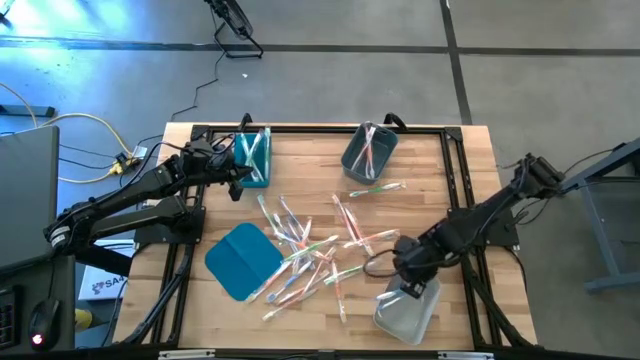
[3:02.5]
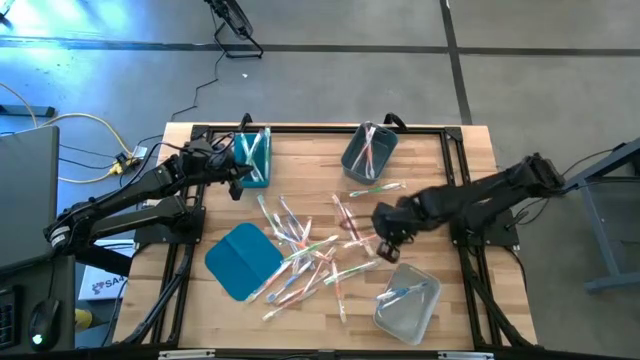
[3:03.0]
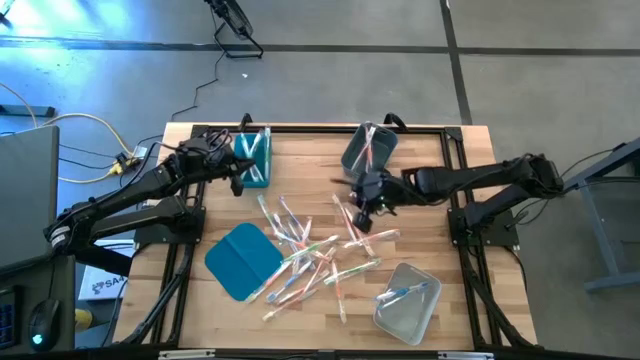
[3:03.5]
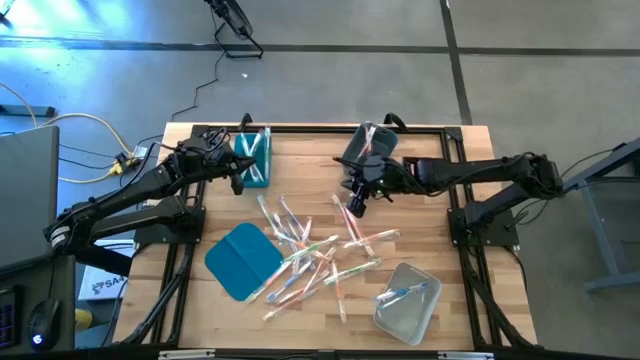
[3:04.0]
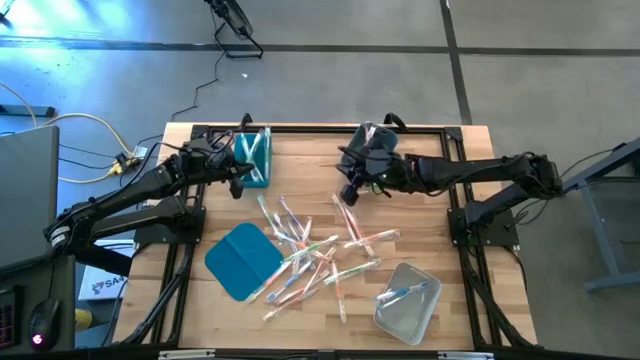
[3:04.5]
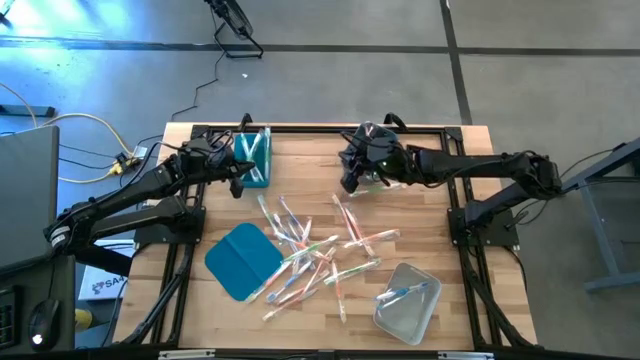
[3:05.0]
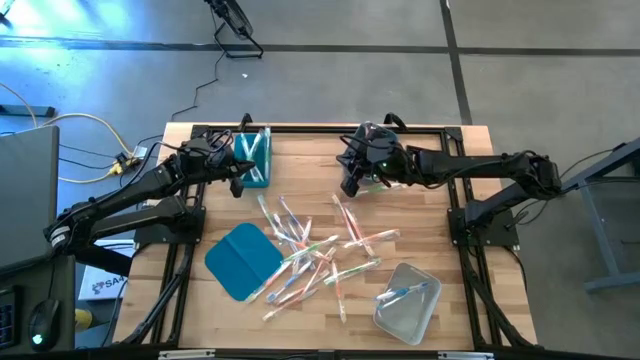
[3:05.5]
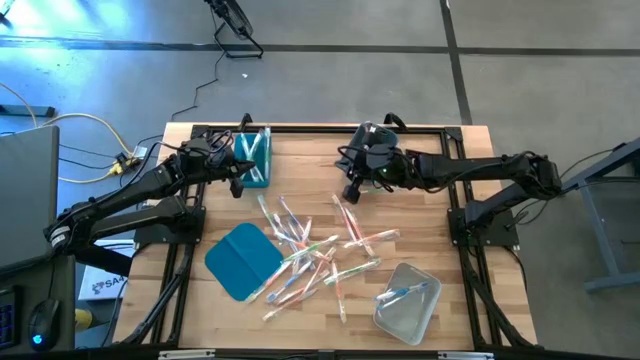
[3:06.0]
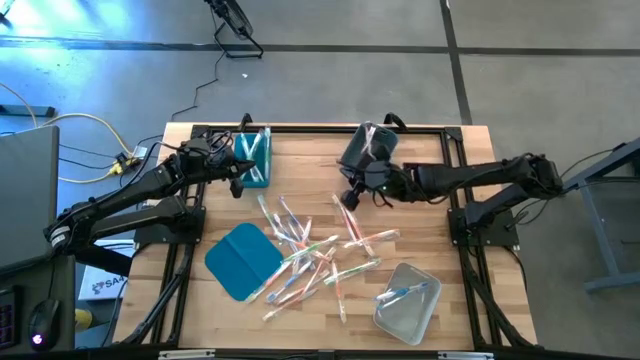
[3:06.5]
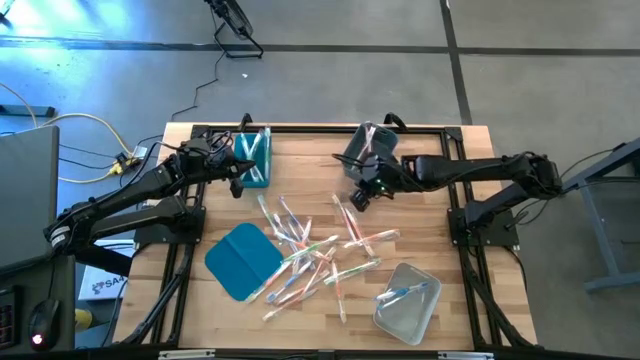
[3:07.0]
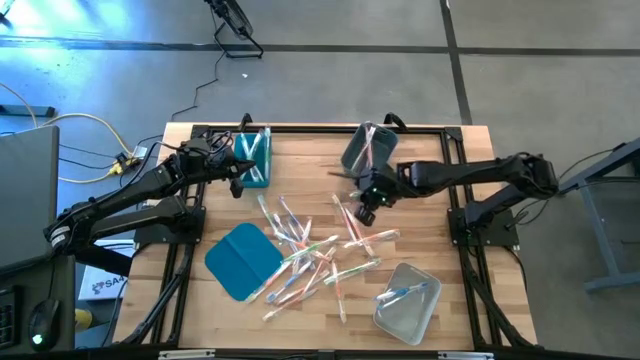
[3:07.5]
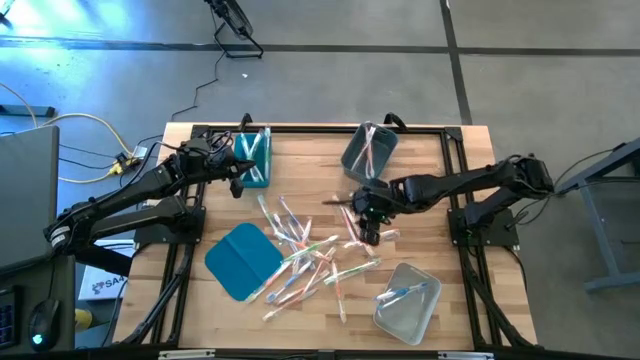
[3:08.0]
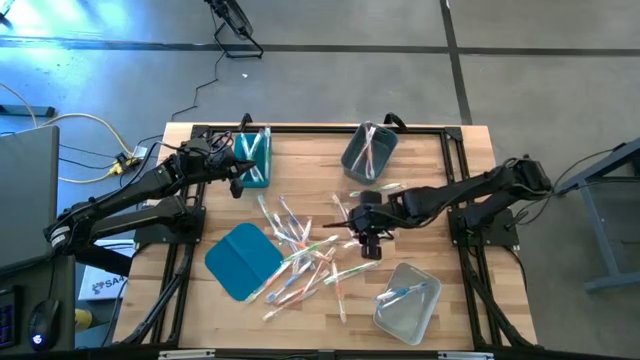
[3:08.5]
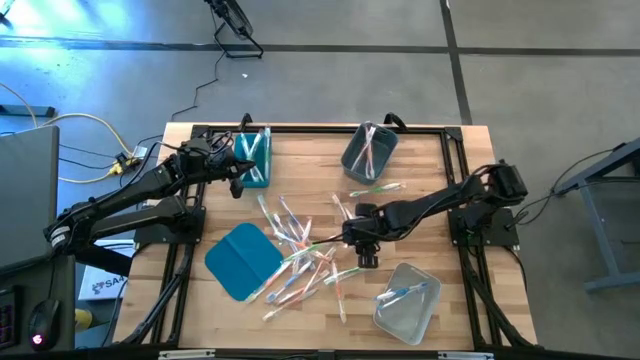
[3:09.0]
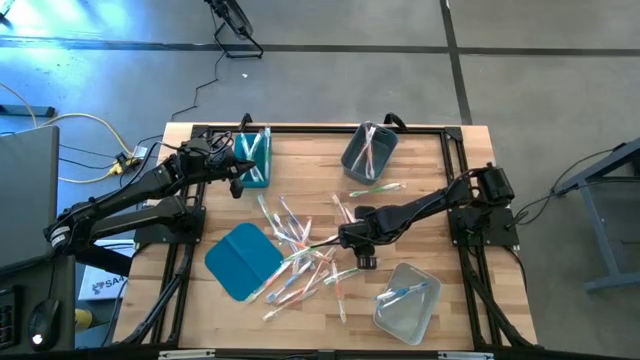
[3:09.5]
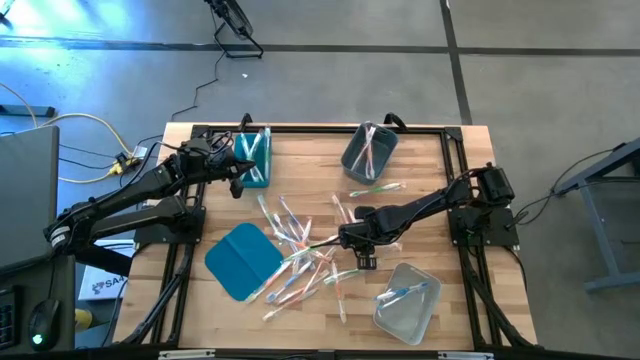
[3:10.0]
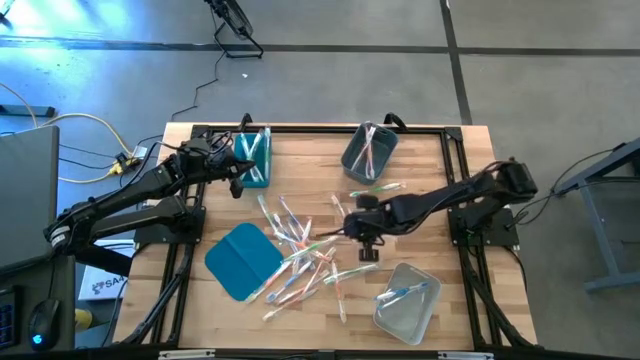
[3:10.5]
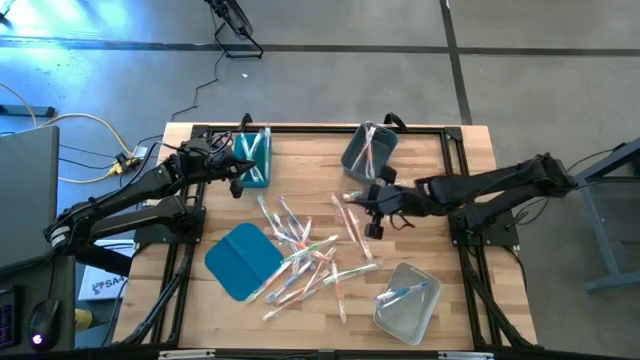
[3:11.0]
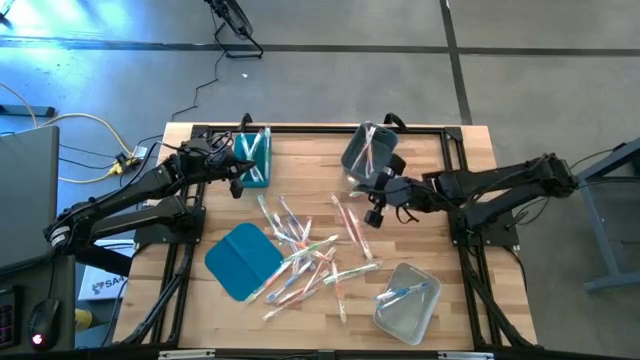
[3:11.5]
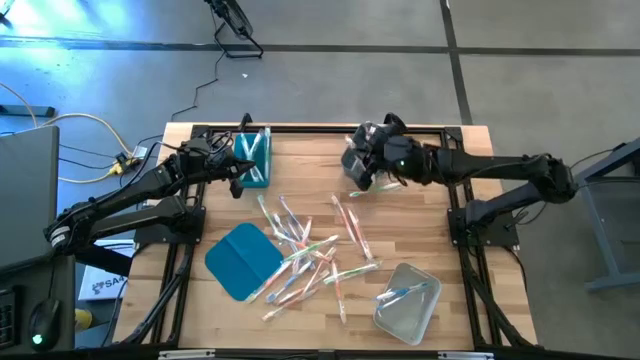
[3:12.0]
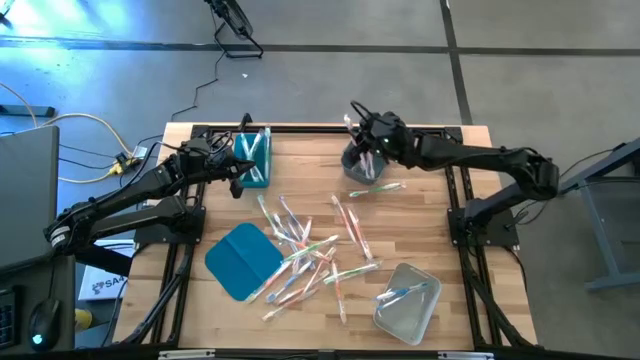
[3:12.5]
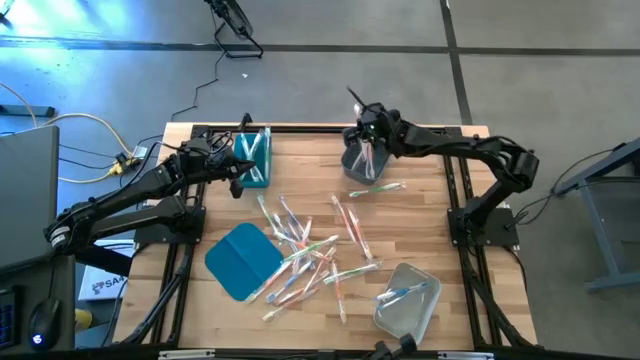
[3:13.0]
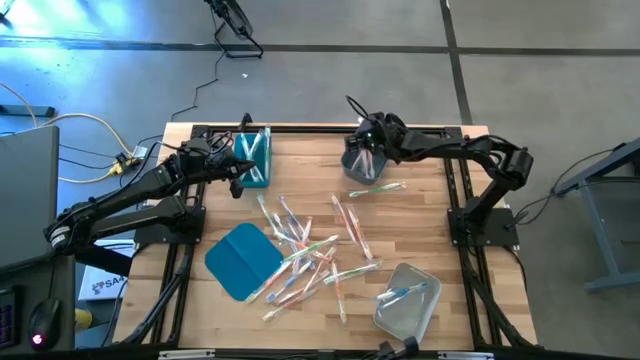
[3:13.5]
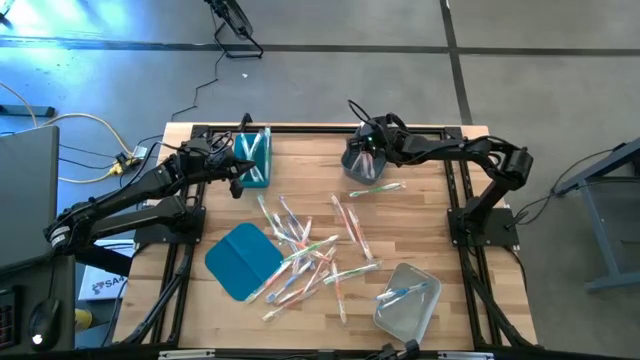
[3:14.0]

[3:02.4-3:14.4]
Task: Pick & Place Toothbrushes
Put the orange toothbrush into the dark gray bin

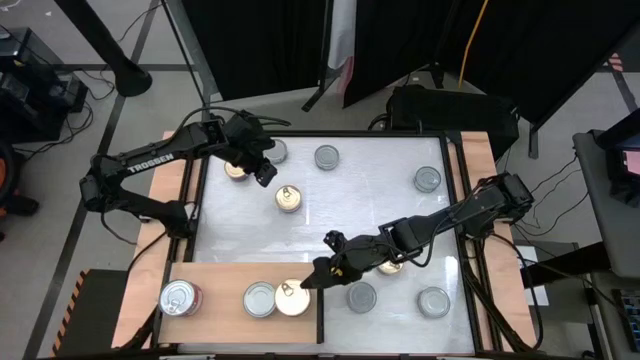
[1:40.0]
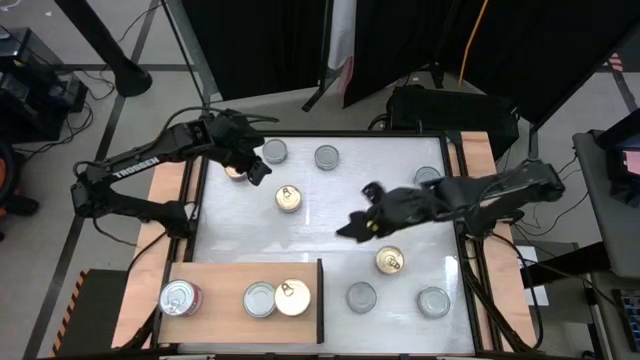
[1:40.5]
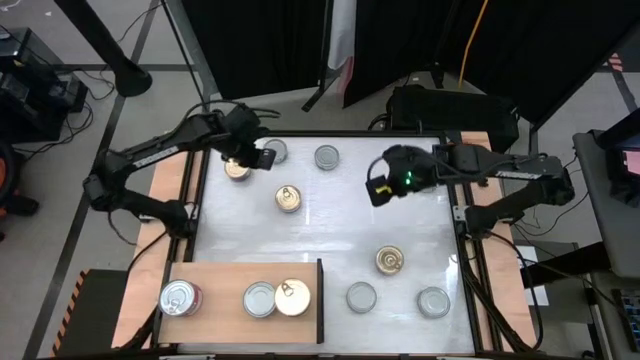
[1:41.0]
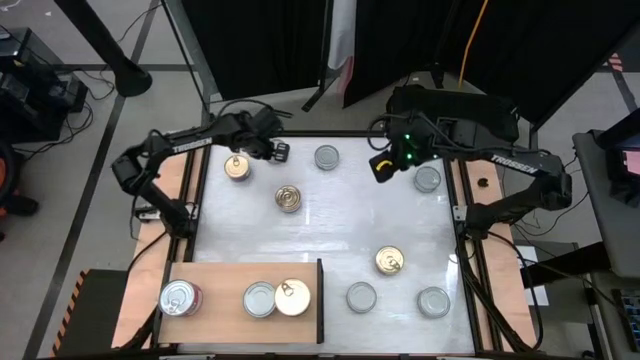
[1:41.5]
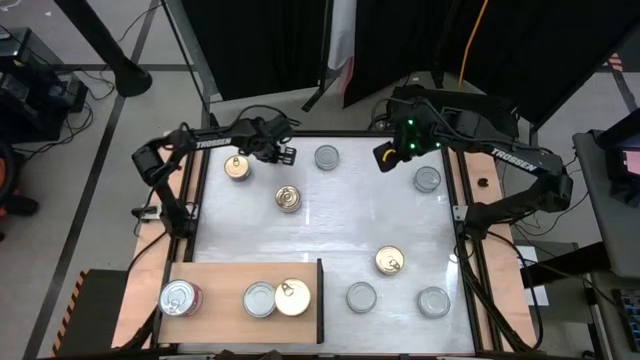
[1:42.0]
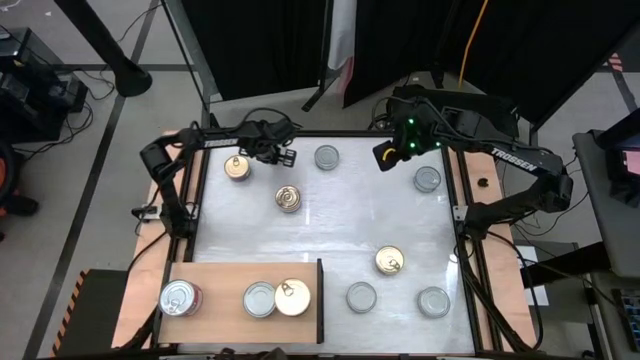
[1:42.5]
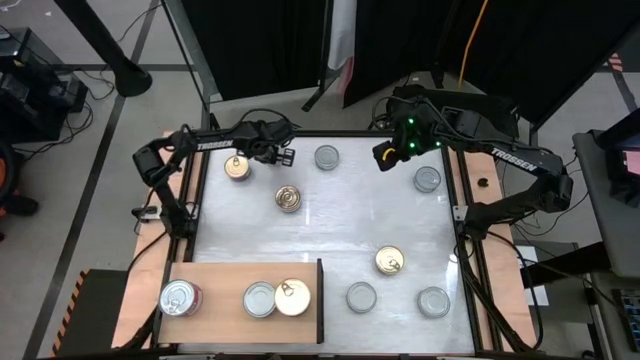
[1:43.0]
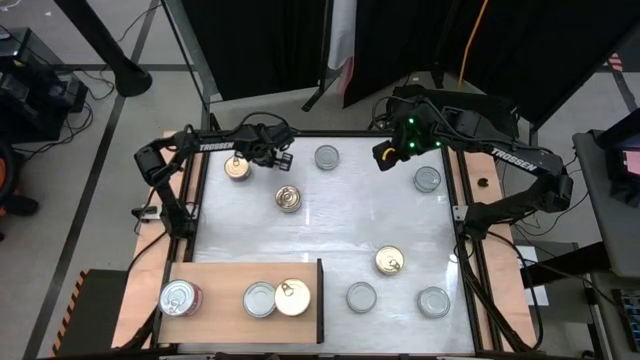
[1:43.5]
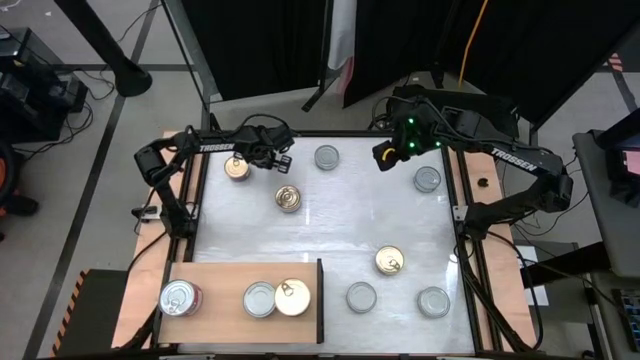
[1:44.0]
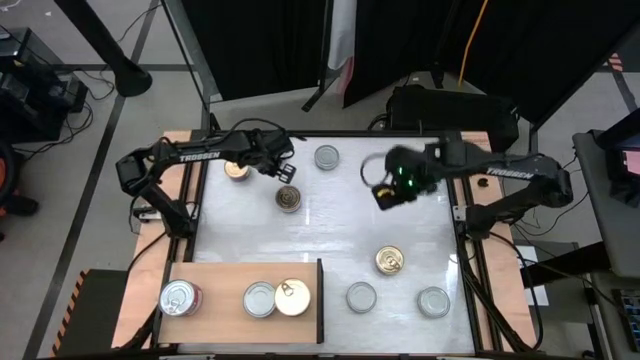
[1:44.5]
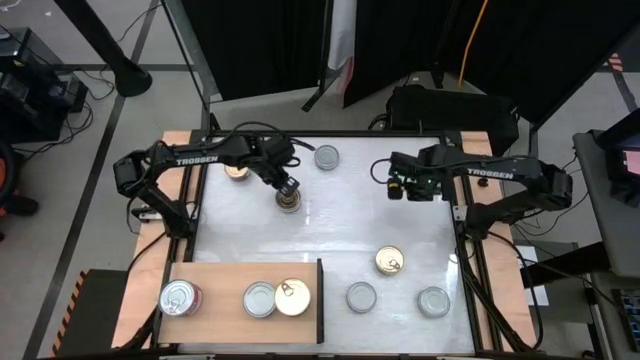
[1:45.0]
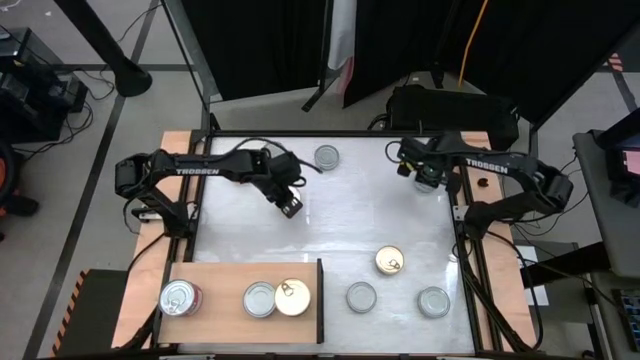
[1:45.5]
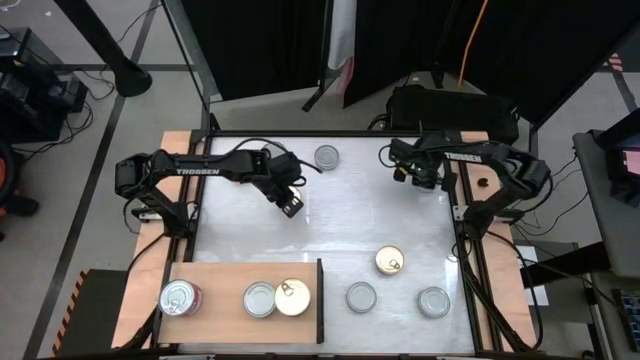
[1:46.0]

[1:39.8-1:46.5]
Task: Stack canned seafood by type on shelf
Put the green blue tuna can on the shelf
